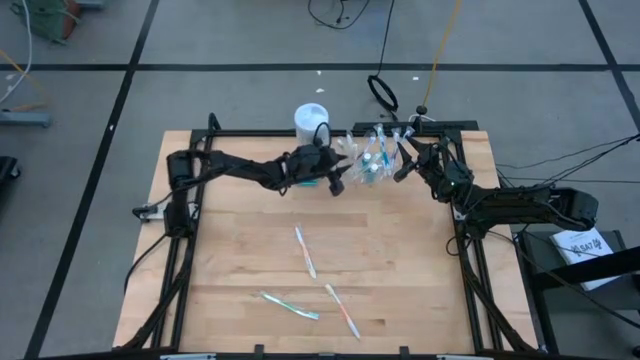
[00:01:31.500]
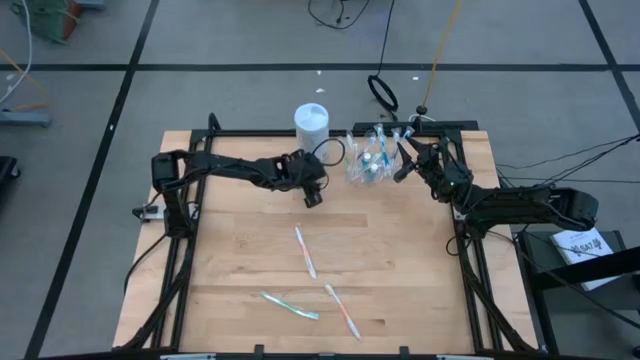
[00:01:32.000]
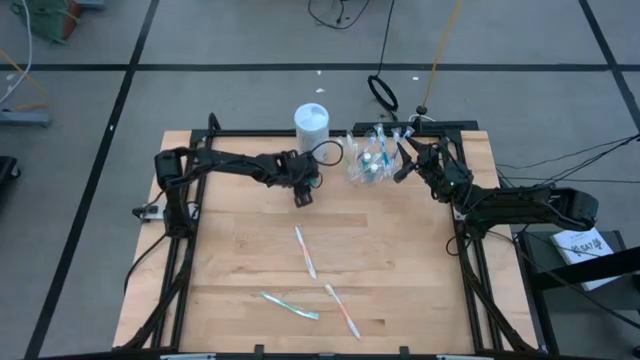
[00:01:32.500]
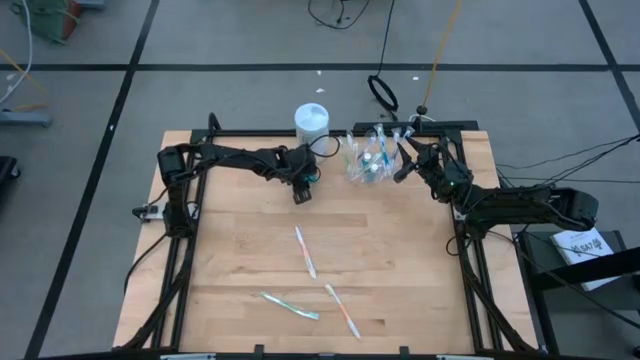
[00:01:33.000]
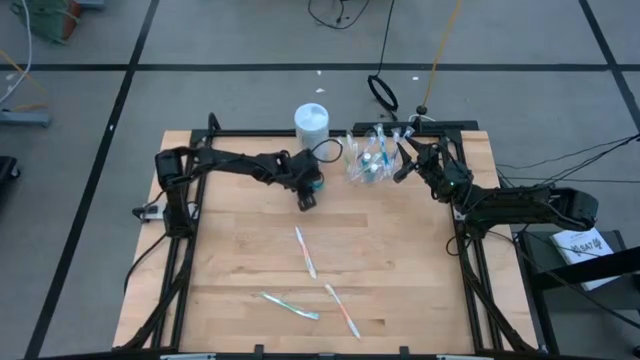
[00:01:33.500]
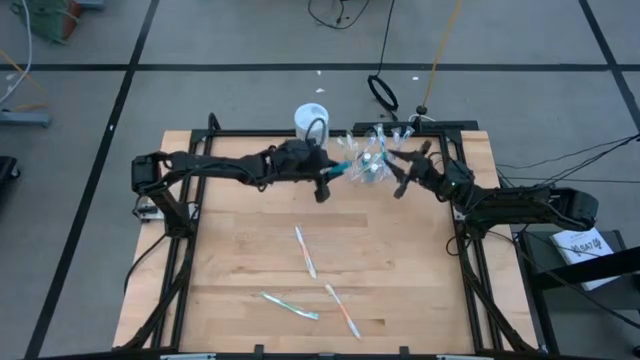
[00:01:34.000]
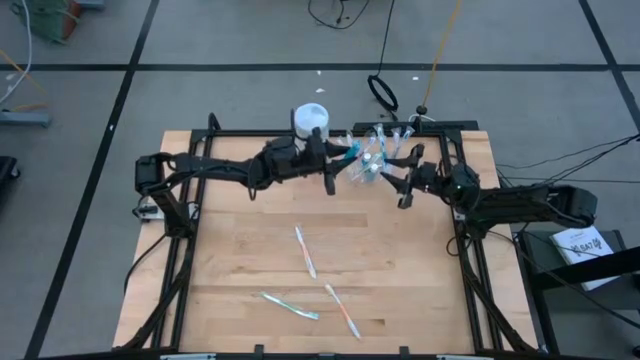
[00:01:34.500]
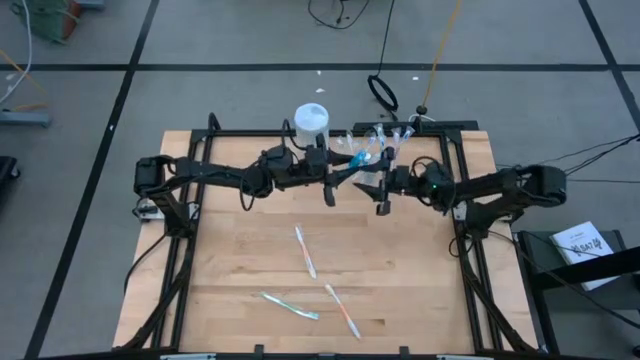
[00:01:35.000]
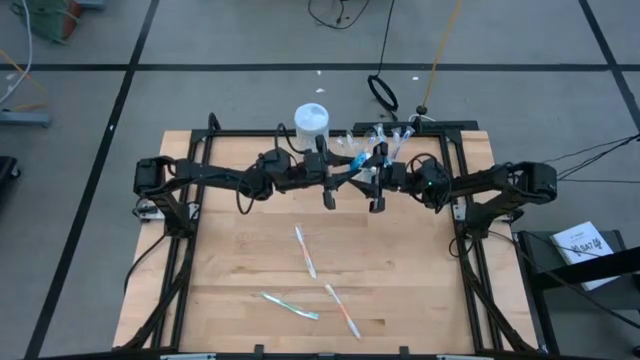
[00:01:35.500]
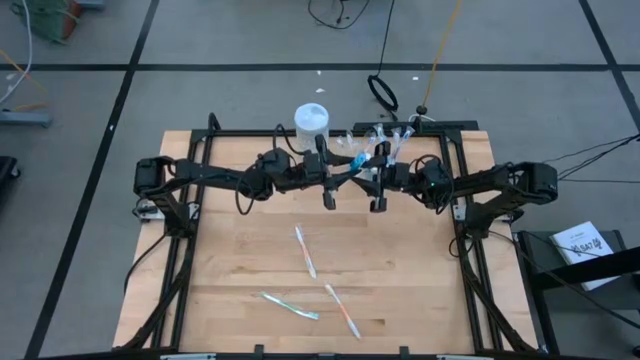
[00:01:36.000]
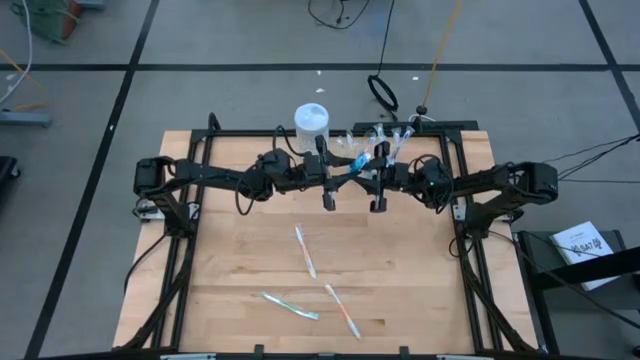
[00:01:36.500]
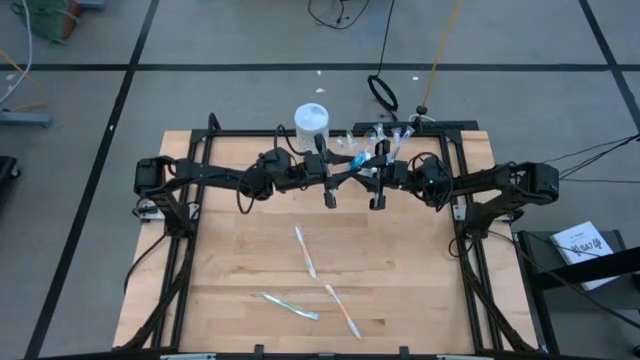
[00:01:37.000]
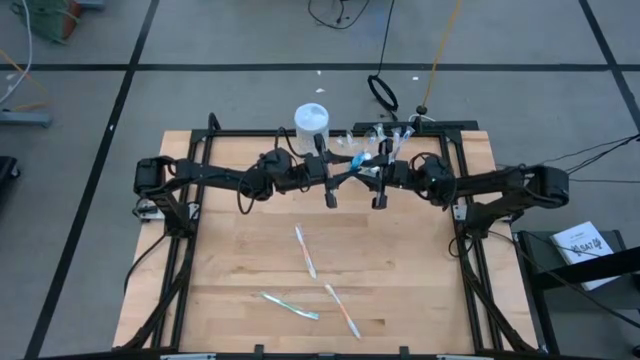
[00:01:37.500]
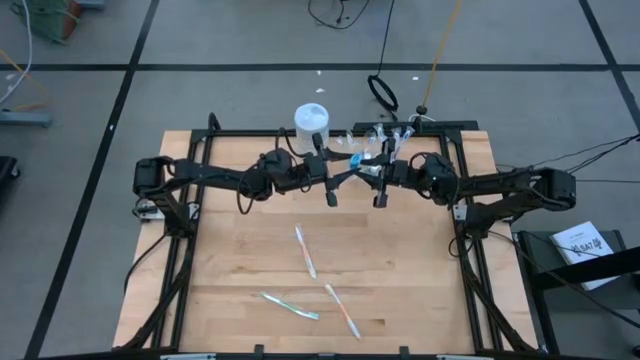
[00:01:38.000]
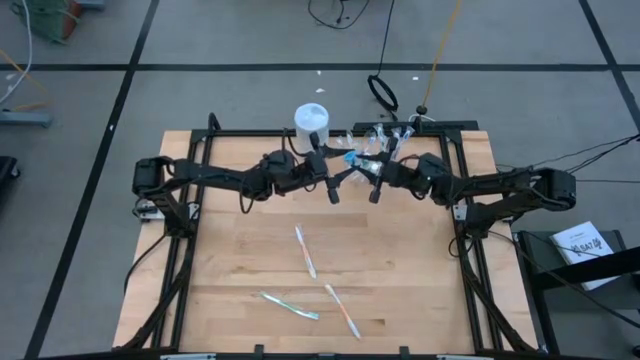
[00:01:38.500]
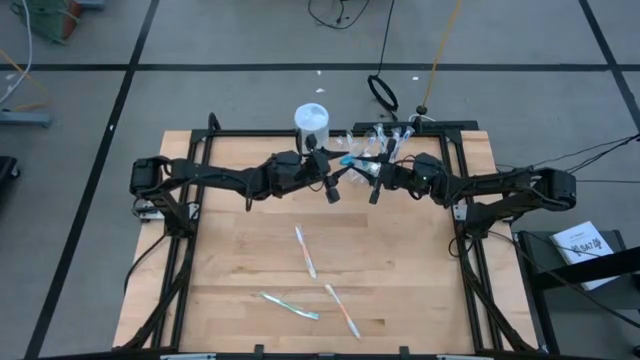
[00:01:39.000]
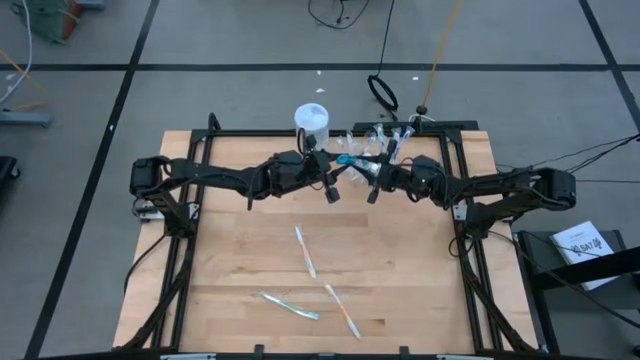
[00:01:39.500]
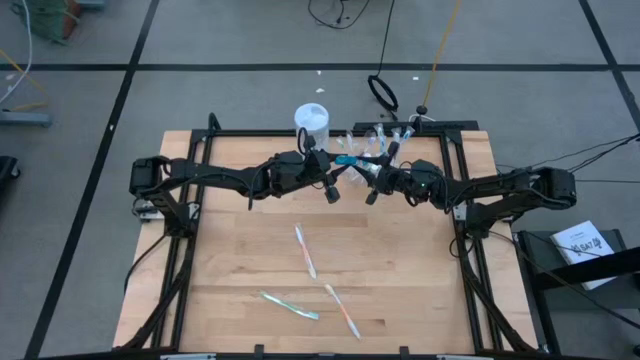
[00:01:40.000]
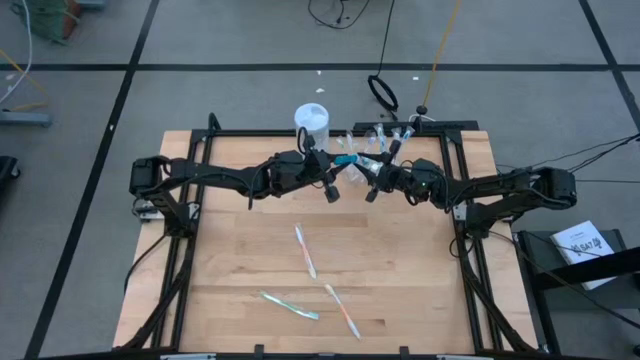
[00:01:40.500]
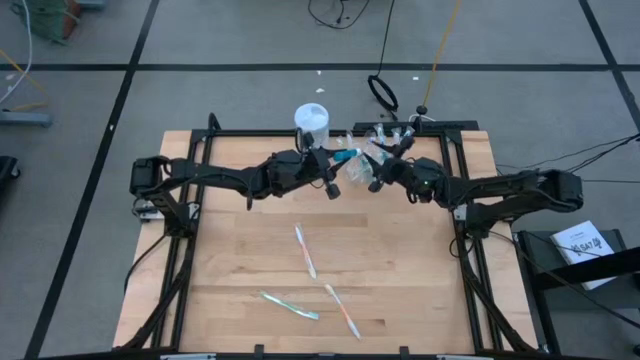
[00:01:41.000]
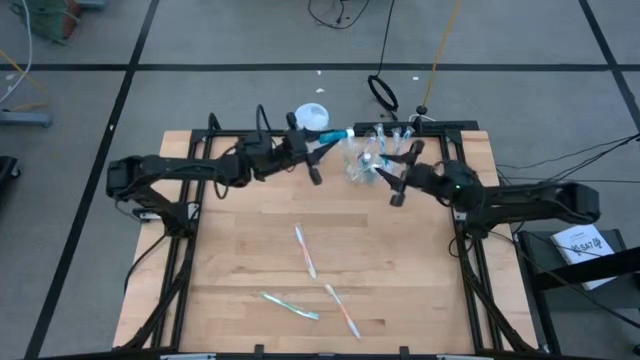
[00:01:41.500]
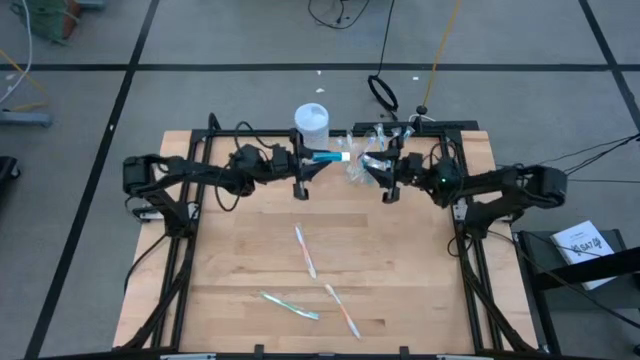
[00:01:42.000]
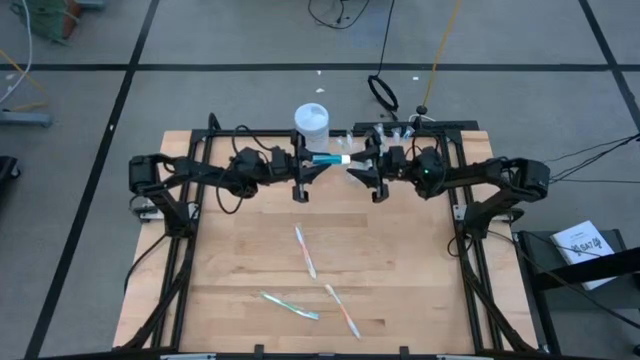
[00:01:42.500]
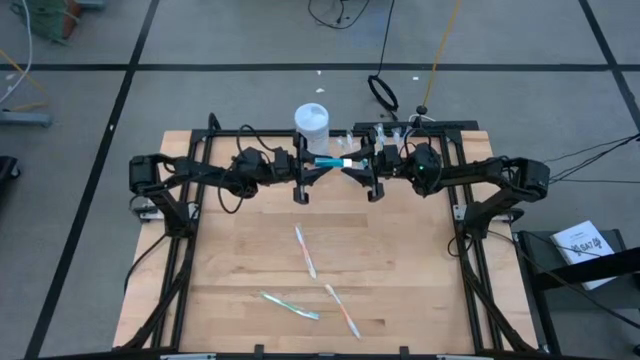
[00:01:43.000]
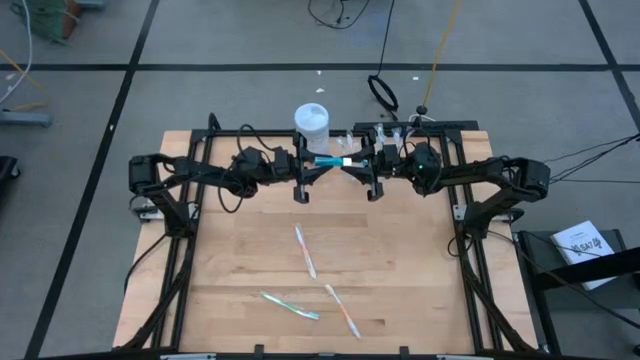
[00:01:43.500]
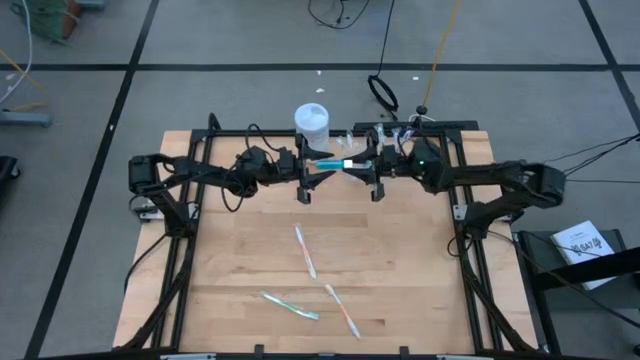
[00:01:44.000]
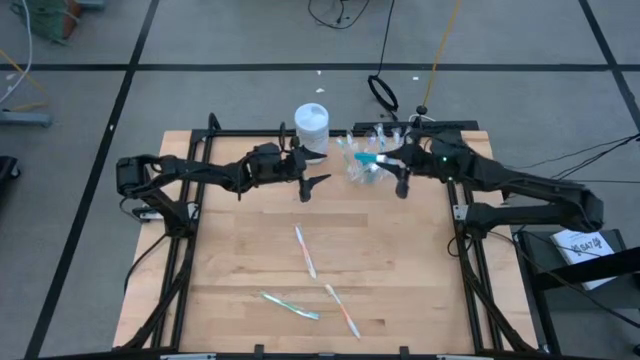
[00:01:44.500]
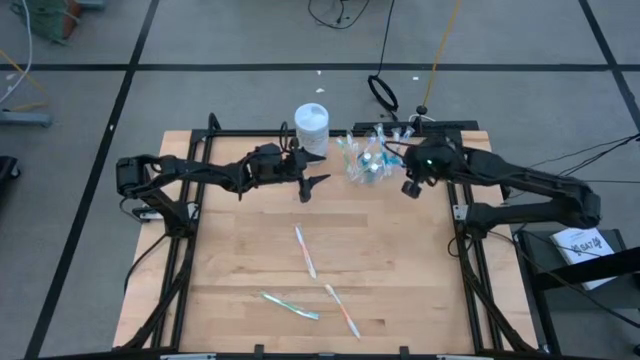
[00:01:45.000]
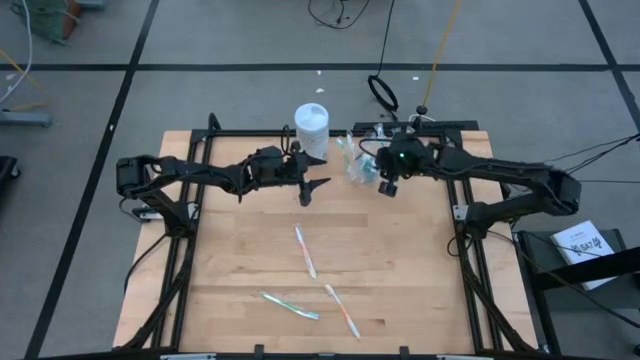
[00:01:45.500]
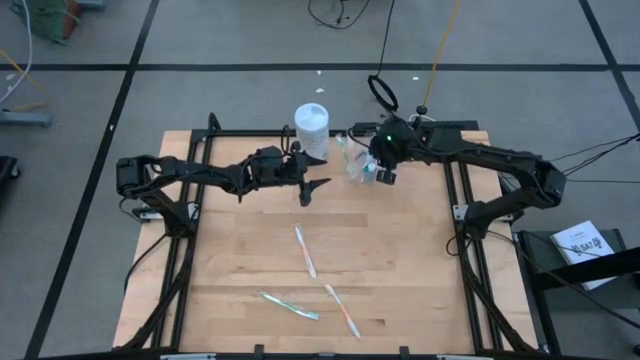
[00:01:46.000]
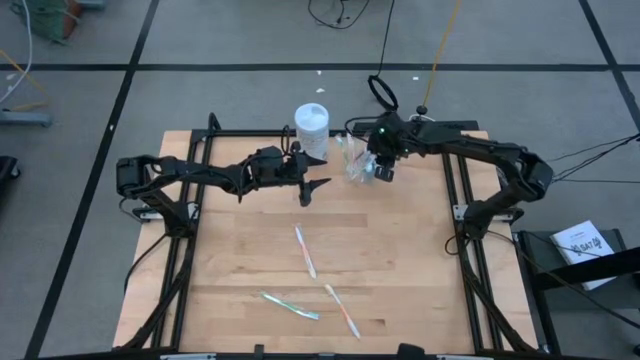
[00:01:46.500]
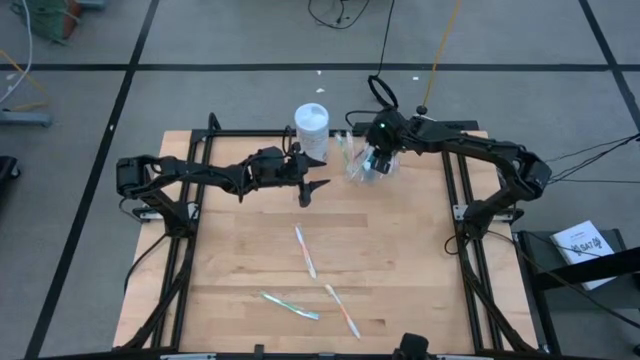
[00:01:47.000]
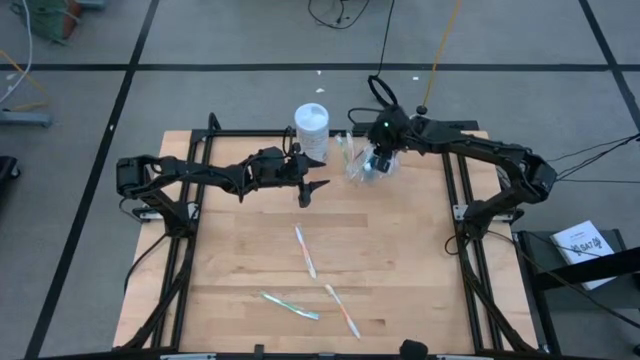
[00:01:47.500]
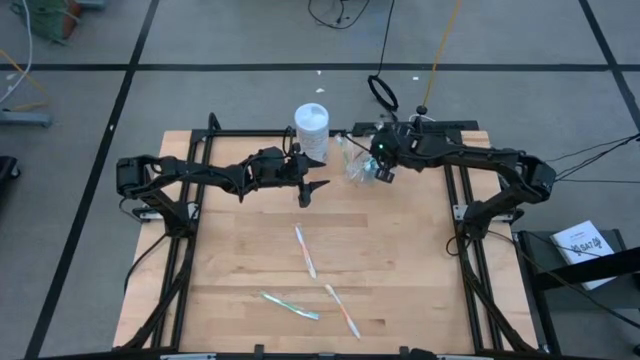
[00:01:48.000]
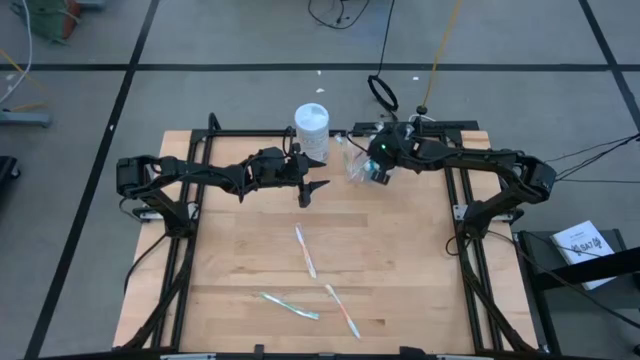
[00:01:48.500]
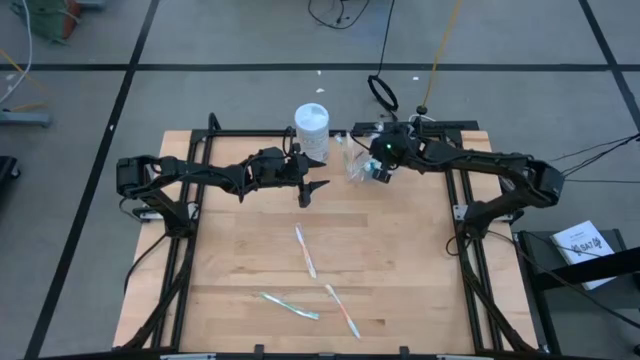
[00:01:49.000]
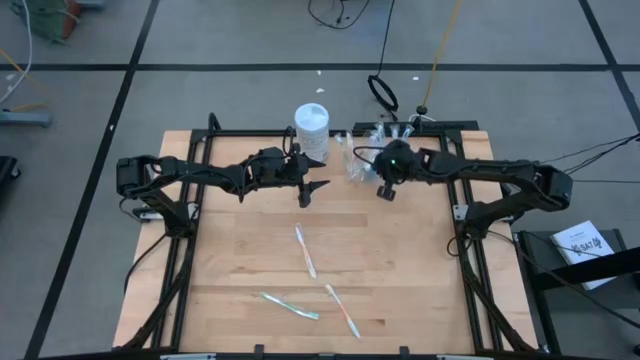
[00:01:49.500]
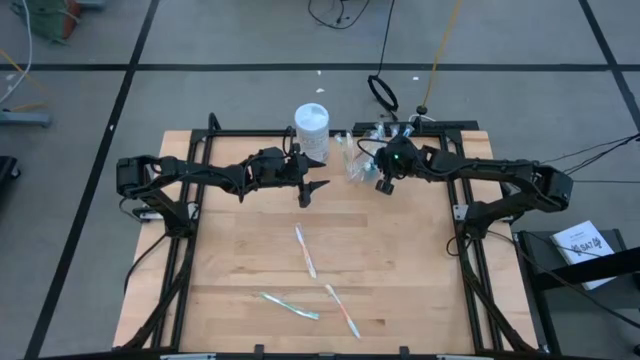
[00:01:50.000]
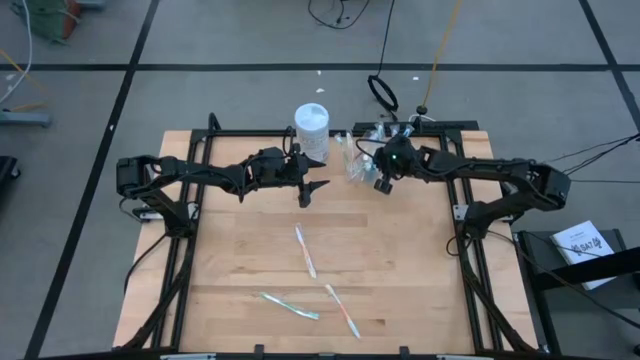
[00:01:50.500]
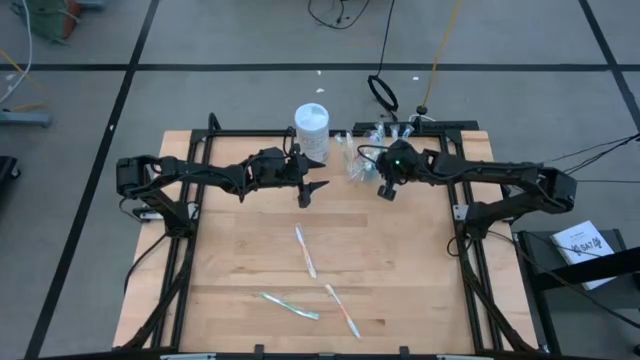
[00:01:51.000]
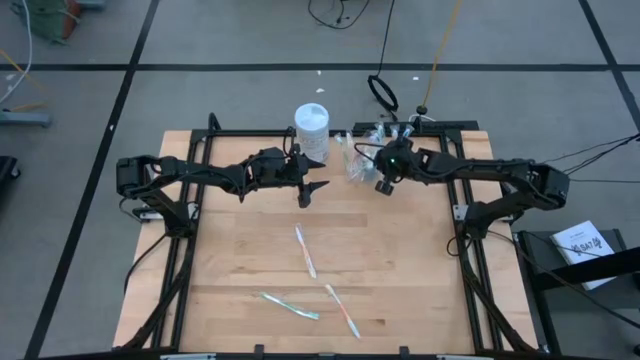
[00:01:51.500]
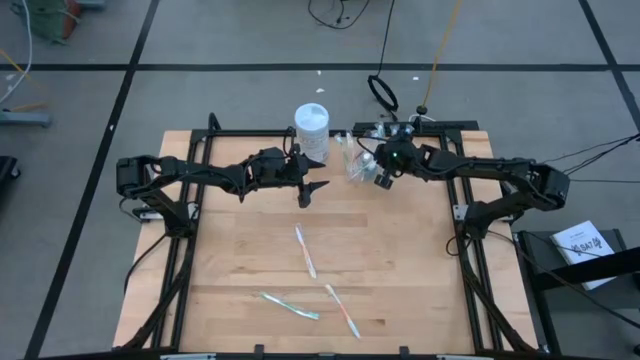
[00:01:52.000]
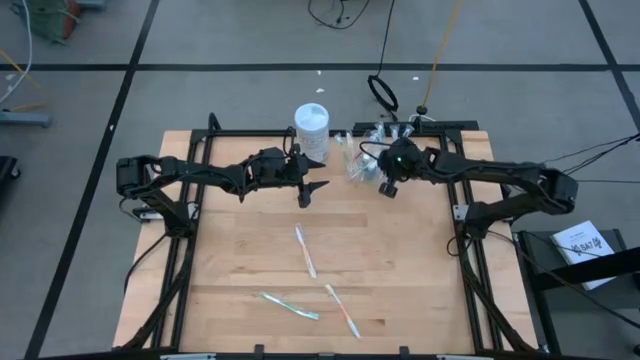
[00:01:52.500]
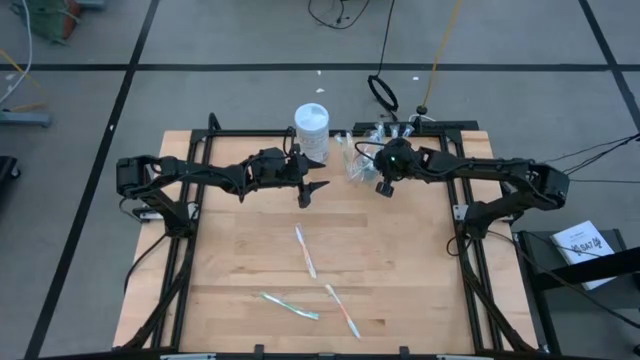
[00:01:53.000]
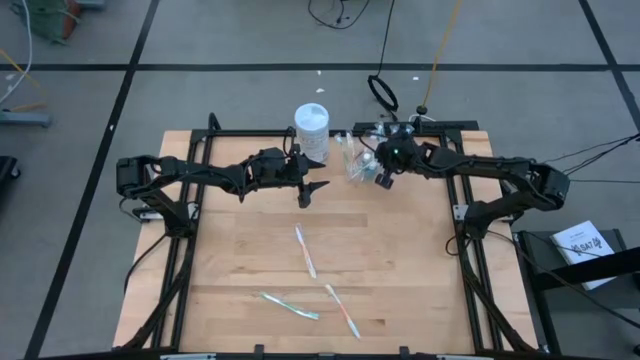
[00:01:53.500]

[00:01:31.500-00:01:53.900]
Task: Pick & Place toothbrushing station
Put the blue mouthwash into the transparent organizer
